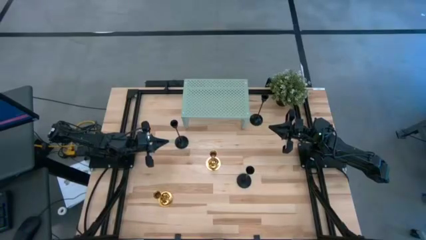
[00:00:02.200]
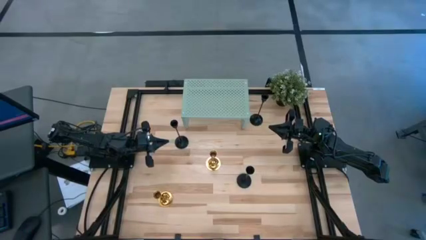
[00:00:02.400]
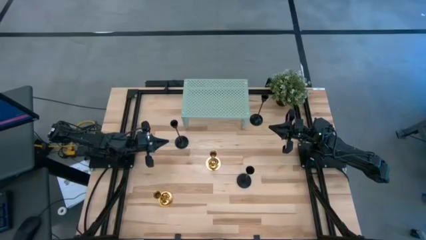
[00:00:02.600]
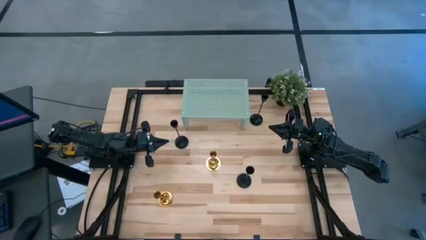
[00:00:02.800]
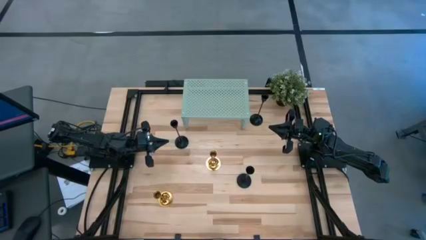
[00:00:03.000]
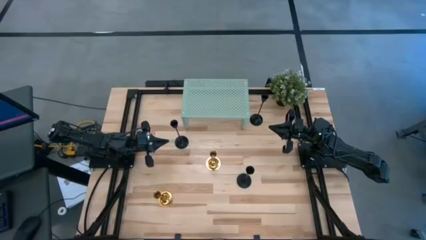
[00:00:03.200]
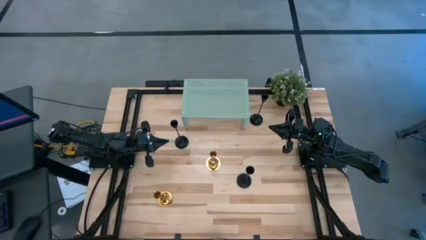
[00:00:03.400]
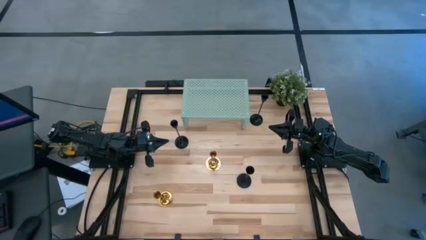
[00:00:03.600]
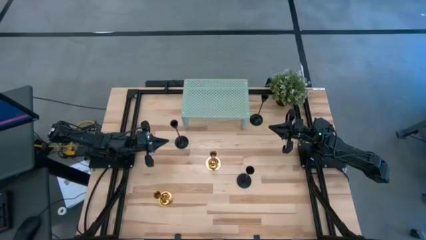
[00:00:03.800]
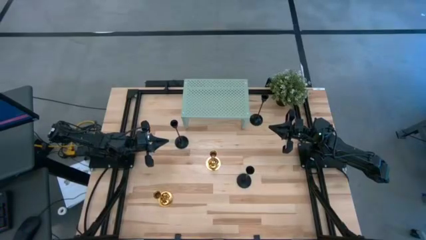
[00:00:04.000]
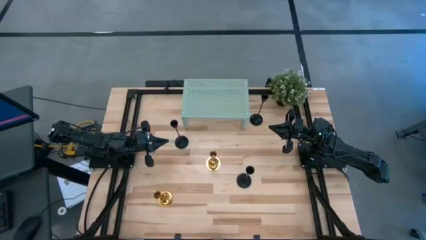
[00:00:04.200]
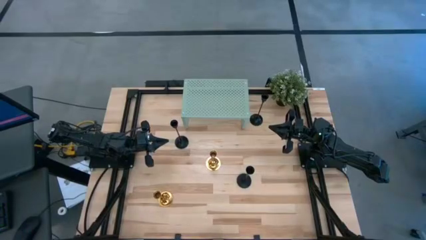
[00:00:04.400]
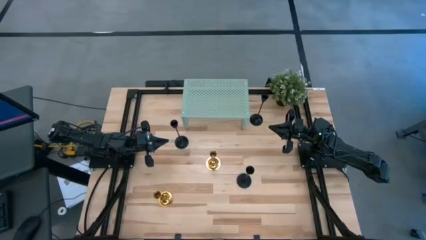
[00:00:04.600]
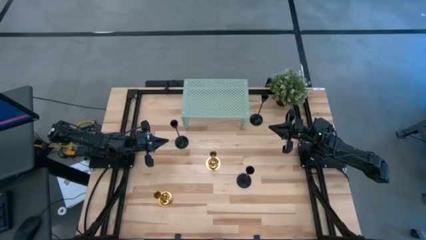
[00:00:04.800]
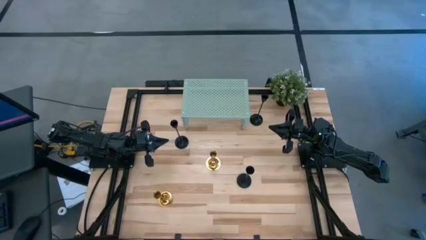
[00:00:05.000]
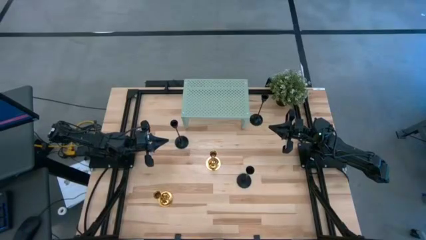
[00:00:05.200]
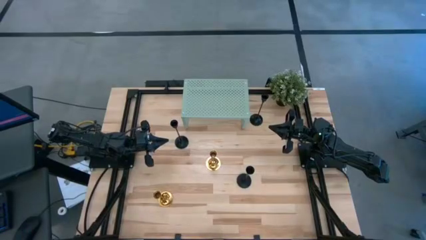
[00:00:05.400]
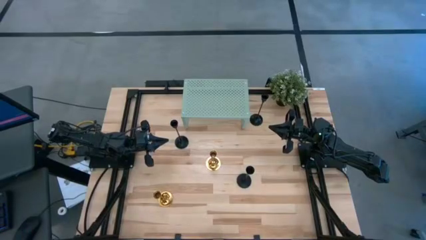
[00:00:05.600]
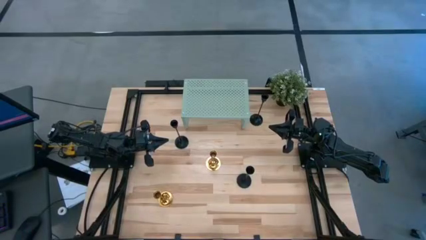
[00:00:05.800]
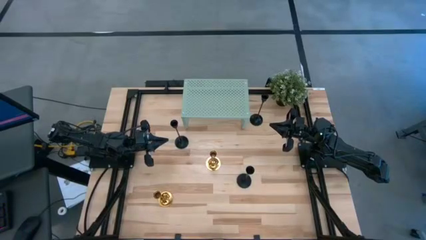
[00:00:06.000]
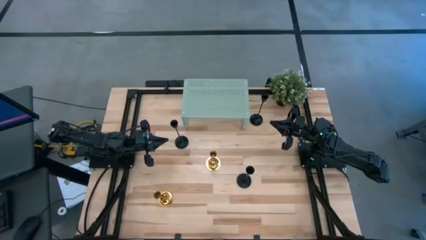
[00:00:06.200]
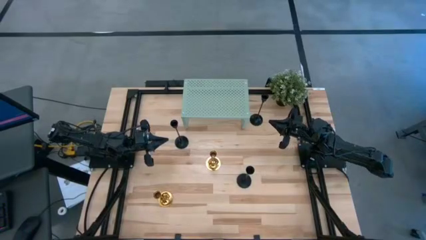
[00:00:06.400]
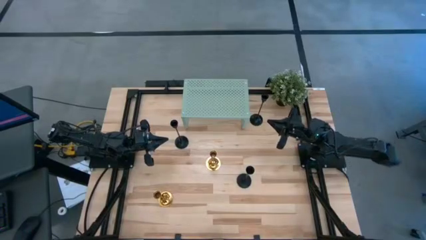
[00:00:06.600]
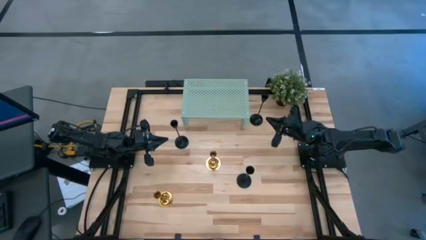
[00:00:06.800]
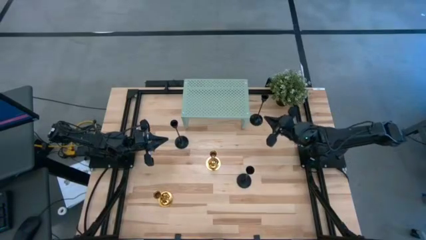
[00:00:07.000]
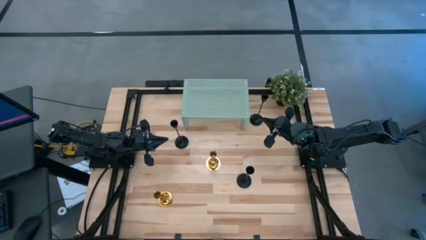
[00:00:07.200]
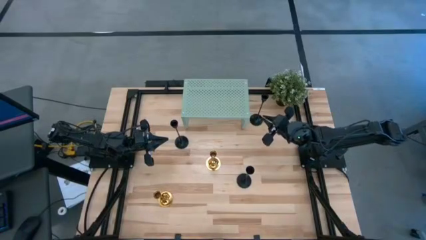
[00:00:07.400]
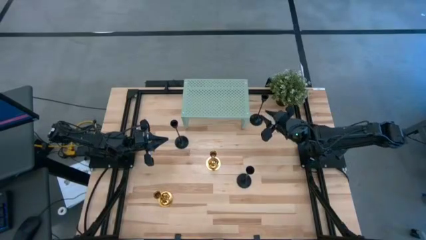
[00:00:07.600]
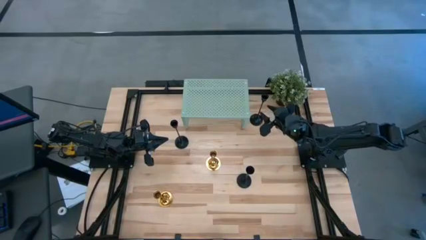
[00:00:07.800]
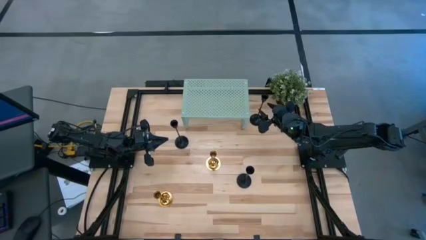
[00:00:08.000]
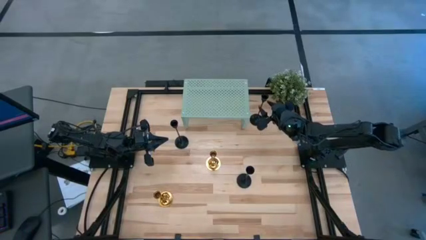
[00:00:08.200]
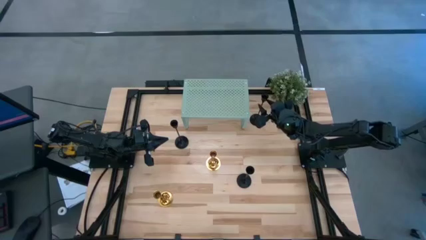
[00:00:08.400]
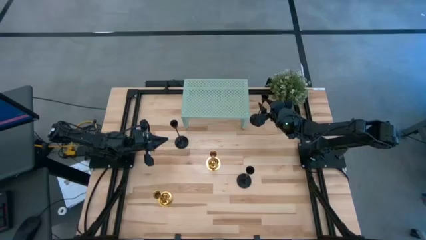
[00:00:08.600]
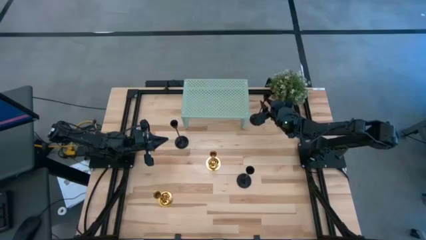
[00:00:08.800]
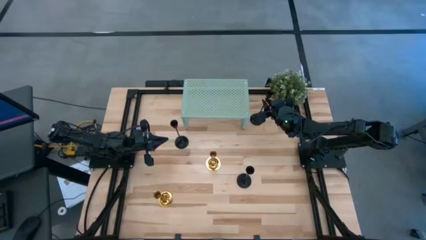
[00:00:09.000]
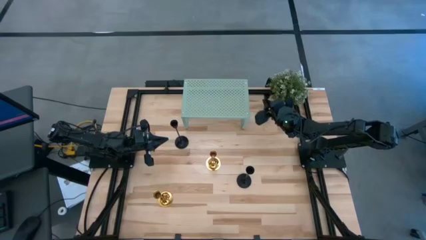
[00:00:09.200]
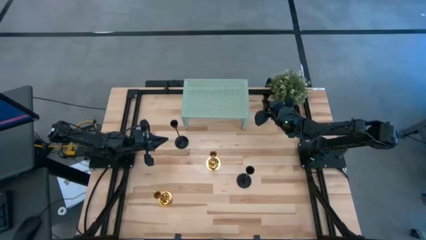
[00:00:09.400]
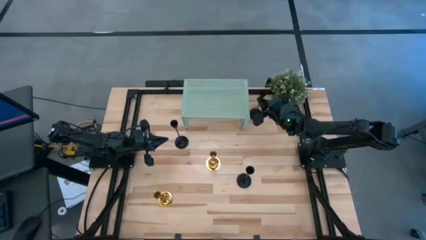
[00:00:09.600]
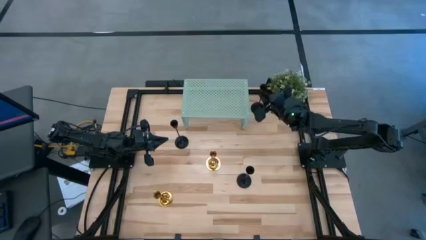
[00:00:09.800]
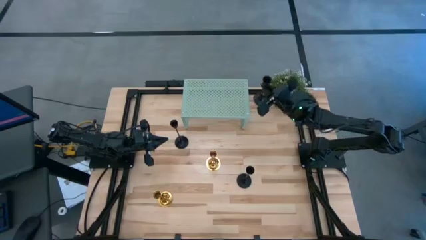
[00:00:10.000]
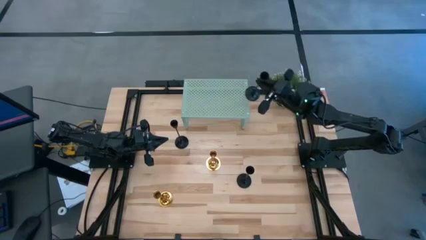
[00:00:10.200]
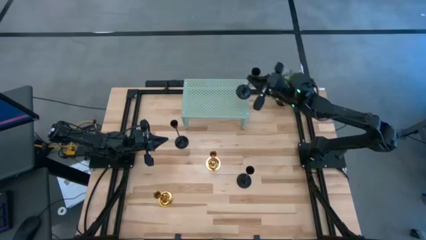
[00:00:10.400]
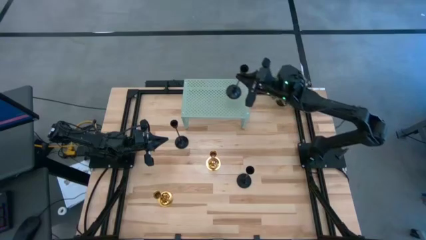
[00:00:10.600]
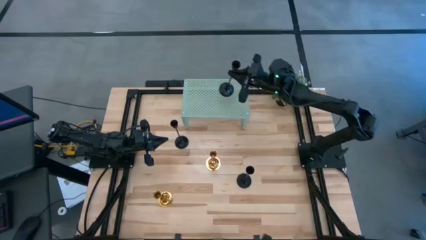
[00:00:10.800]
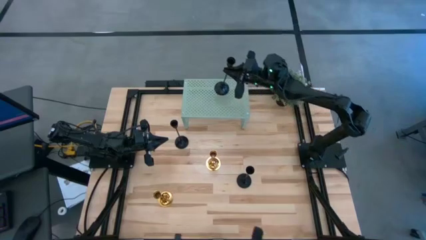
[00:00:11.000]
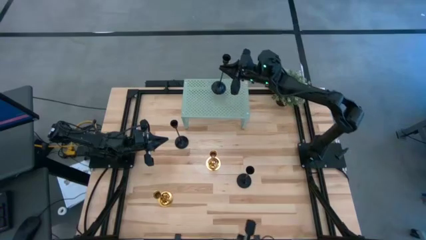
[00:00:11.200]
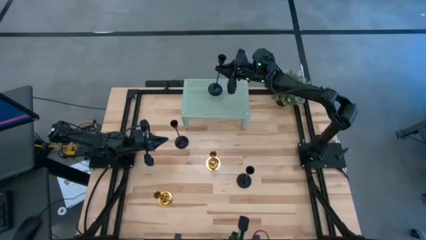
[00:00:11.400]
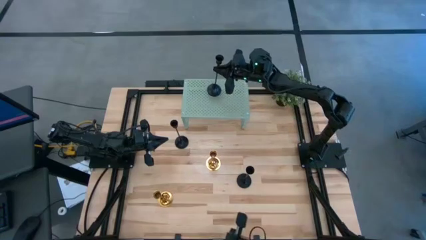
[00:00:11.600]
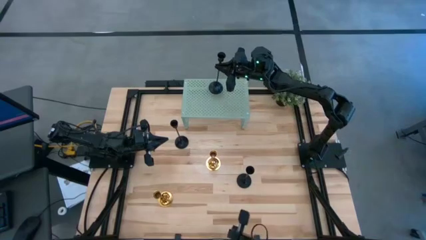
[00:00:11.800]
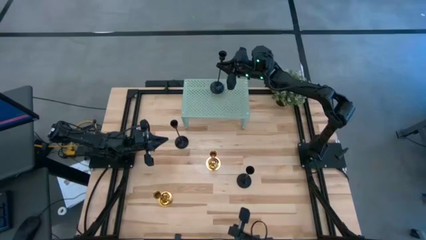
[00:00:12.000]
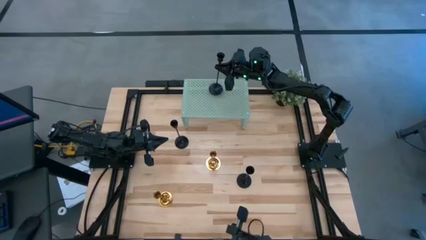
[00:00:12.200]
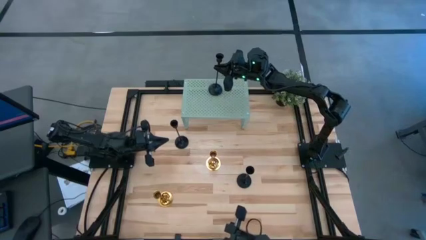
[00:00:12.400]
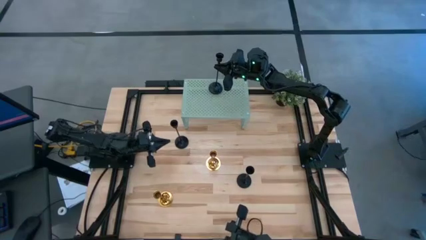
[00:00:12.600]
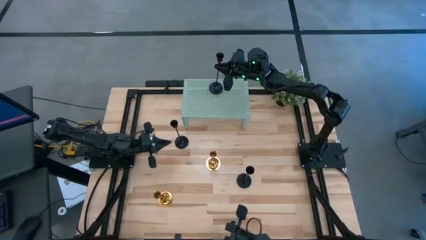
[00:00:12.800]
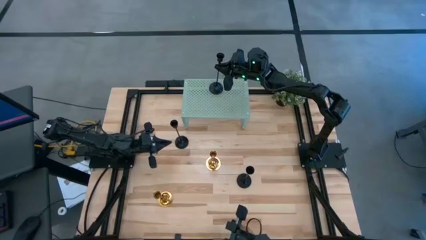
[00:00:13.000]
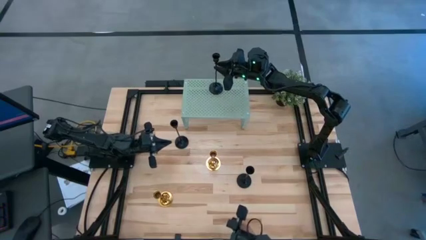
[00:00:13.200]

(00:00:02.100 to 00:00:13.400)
Task: Pick & Place candle stick holders
Put the top right black candle holder on the shelf
